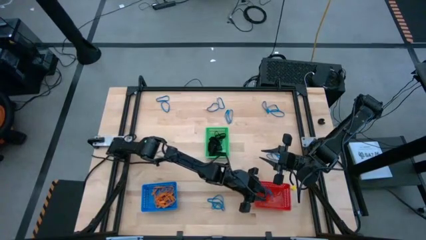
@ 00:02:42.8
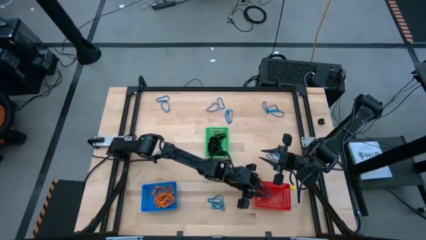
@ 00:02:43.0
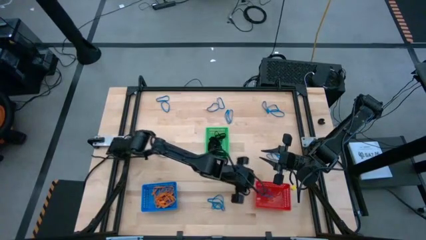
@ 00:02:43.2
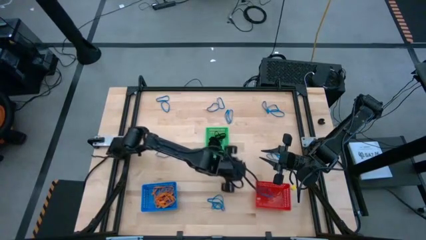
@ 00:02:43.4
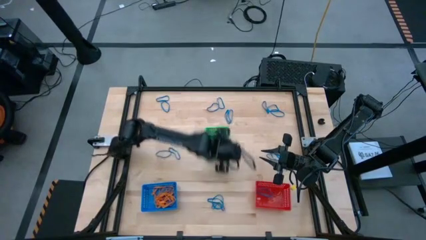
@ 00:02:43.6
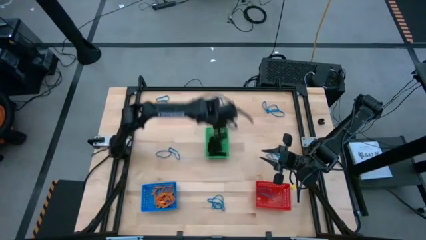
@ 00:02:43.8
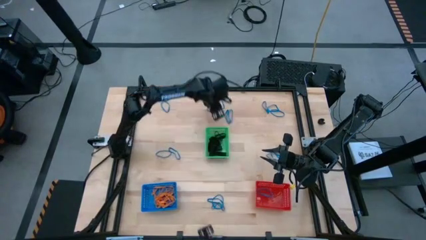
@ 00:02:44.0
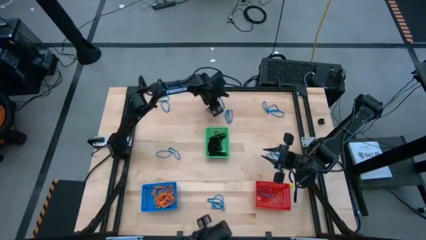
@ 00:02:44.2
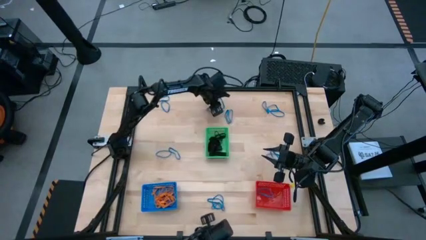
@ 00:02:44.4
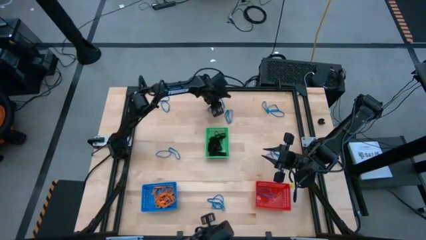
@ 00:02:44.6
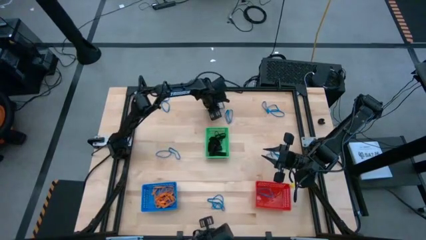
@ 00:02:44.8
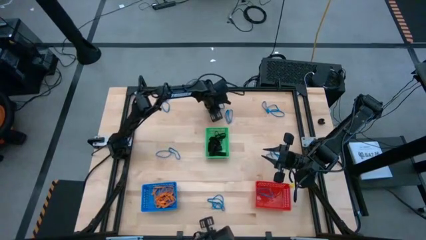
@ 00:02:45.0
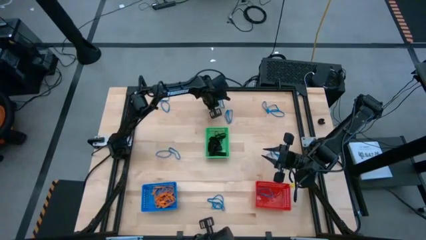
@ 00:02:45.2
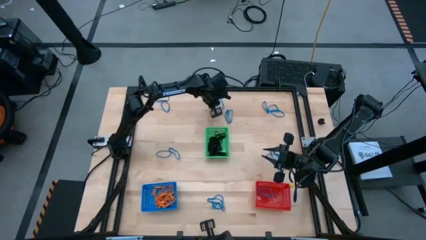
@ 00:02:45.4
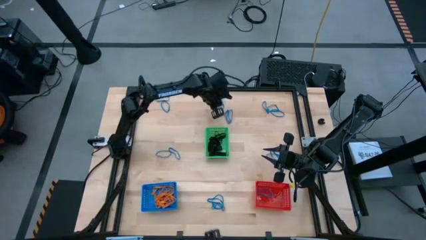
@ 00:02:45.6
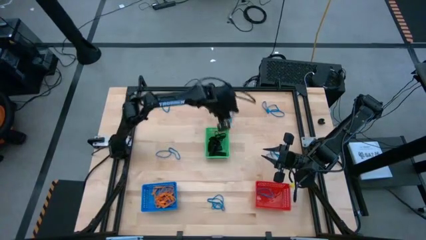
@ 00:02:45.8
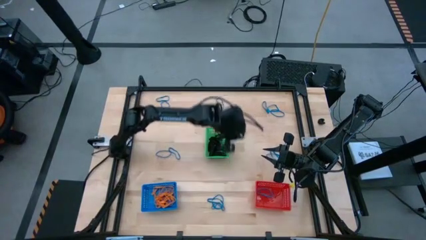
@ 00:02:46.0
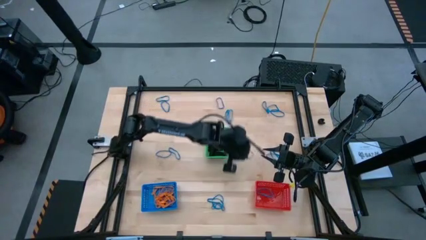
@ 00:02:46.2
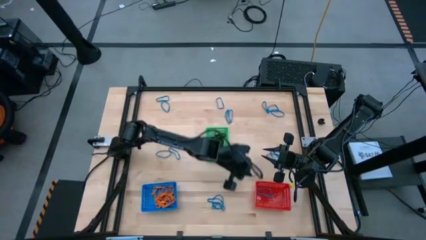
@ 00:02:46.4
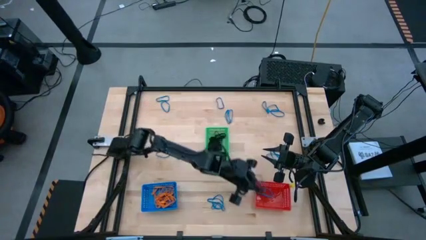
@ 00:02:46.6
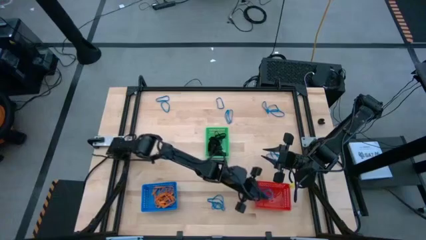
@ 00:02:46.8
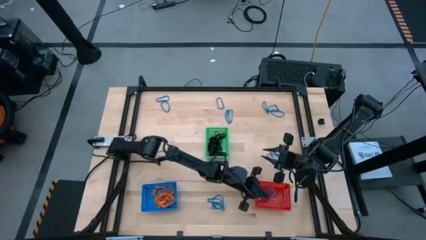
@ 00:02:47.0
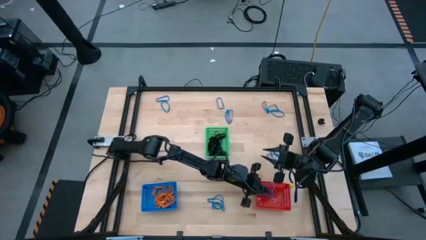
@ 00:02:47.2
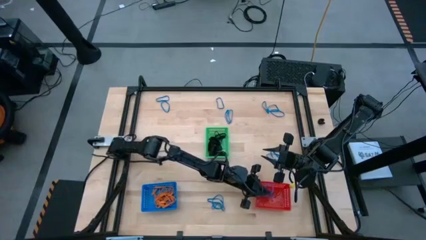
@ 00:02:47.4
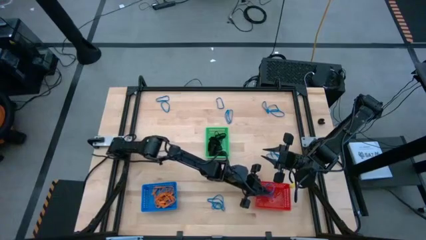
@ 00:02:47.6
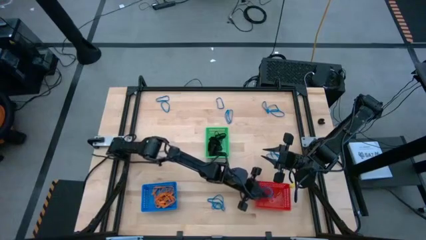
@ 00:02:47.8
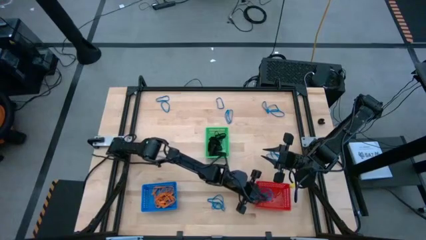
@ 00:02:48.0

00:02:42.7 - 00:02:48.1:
Task: Sort rubber bands into baskets
Put the blue rubber band into the red bin

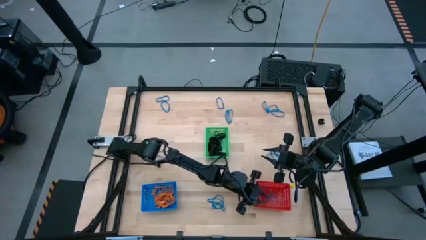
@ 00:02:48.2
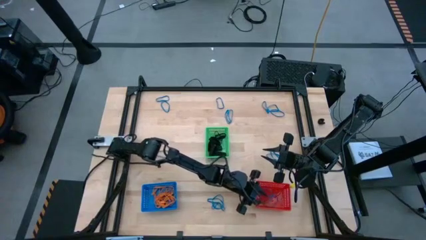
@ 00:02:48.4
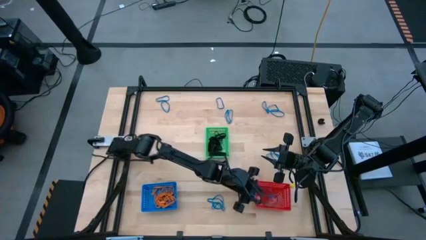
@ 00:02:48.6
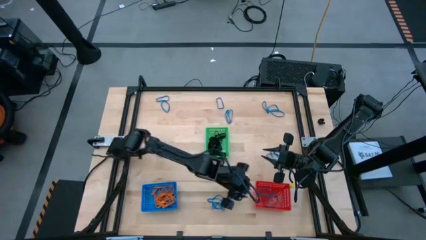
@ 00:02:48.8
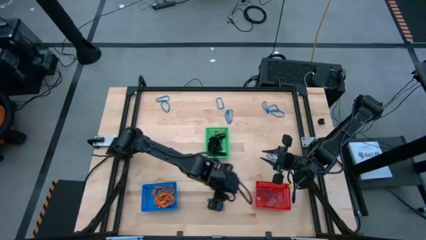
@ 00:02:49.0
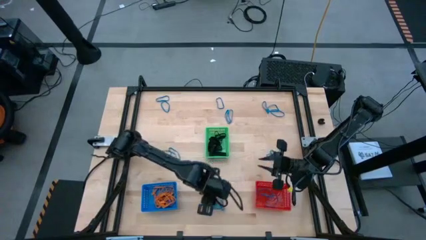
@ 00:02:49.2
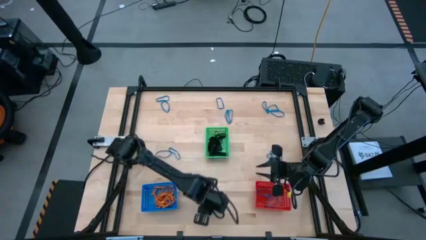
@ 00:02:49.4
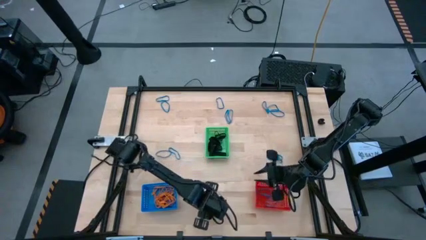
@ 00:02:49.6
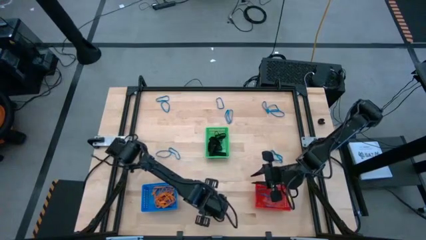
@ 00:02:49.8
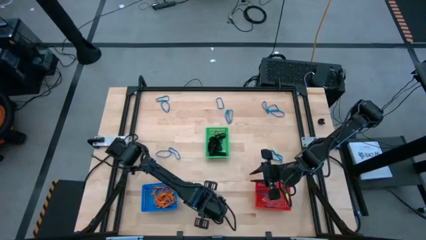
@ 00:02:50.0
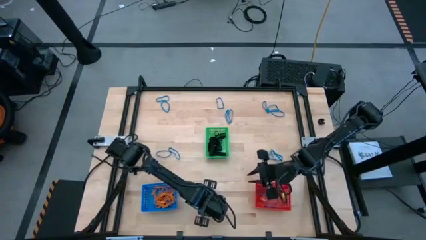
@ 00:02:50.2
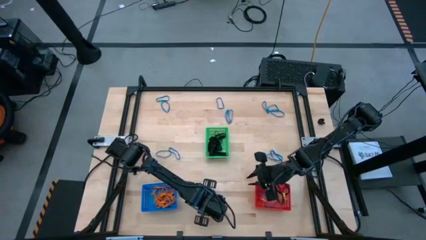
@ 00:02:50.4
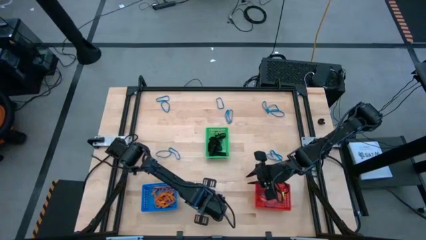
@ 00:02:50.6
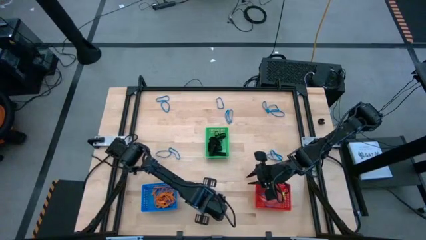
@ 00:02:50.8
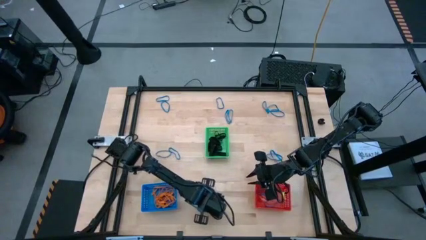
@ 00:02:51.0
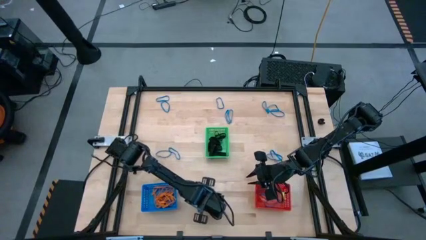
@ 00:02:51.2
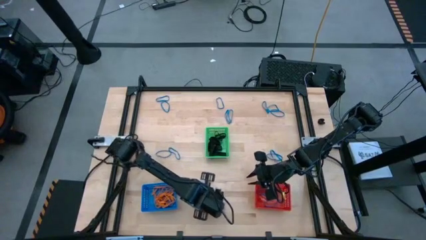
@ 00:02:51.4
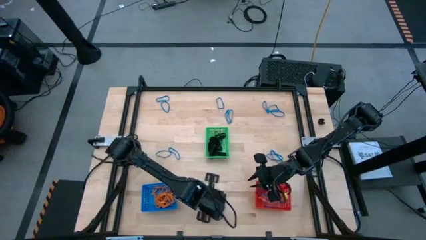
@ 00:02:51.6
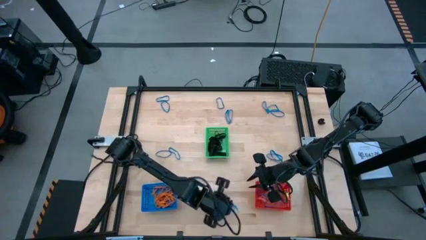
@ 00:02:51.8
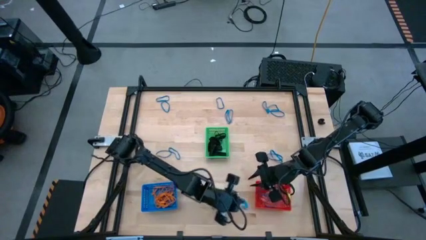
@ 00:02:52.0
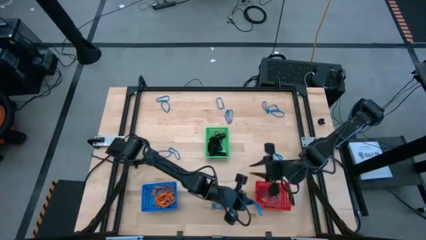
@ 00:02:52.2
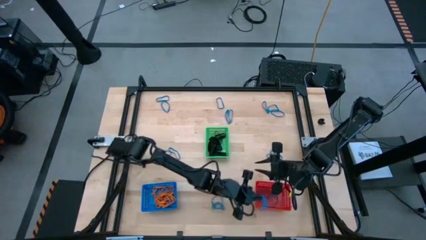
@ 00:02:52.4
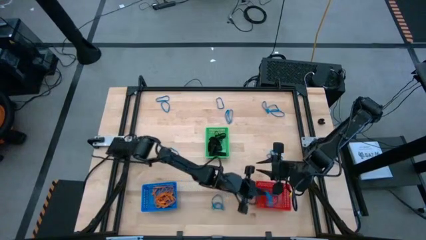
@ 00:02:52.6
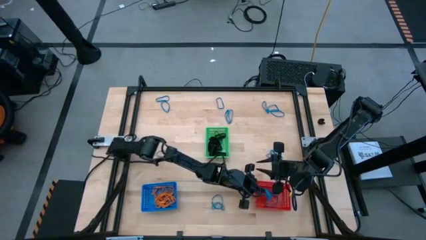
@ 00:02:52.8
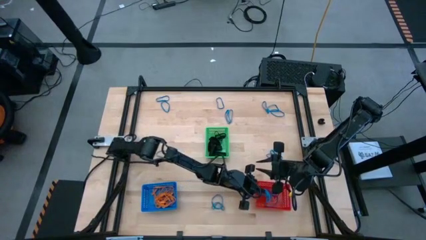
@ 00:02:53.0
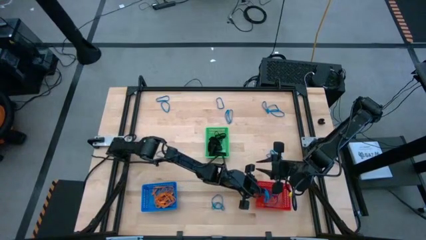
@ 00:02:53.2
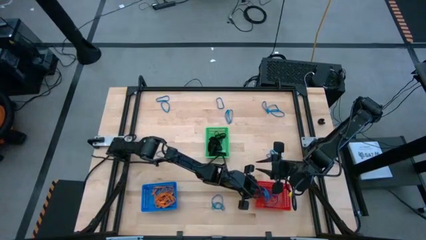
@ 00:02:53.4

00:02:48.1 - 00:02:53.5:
Put the blue rubber band into the red bin

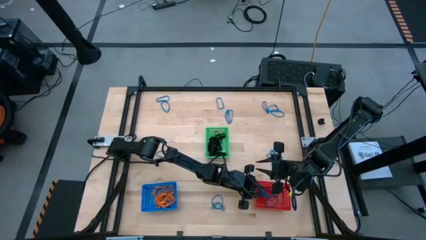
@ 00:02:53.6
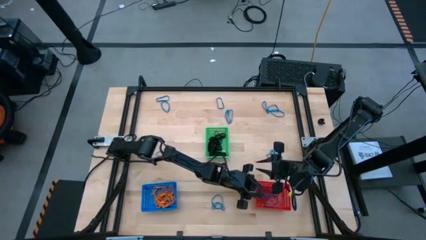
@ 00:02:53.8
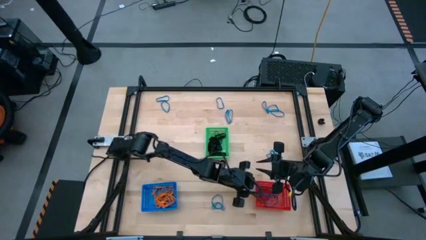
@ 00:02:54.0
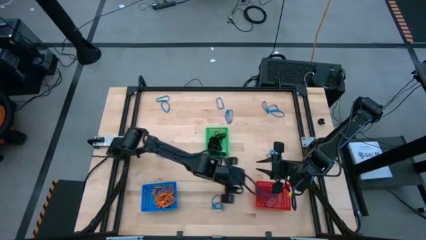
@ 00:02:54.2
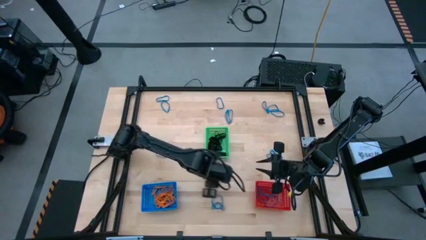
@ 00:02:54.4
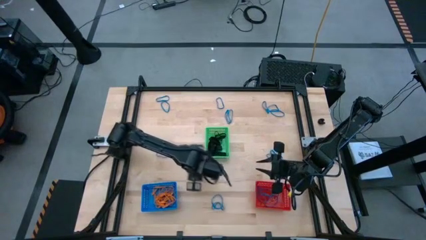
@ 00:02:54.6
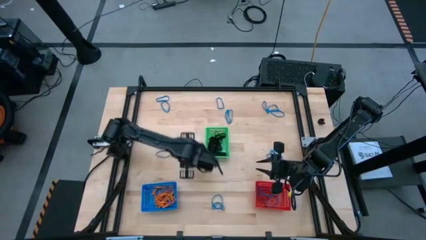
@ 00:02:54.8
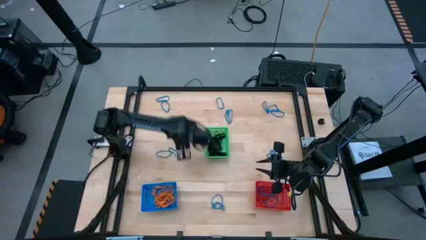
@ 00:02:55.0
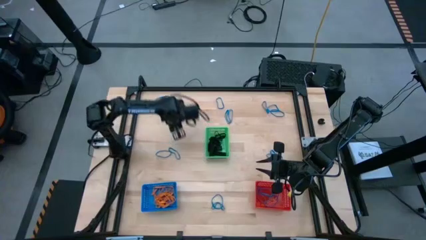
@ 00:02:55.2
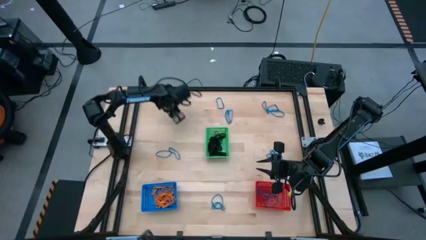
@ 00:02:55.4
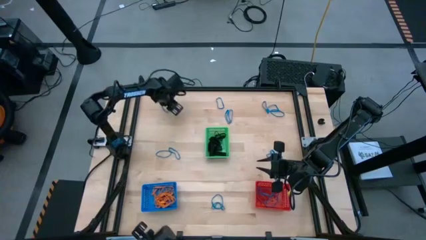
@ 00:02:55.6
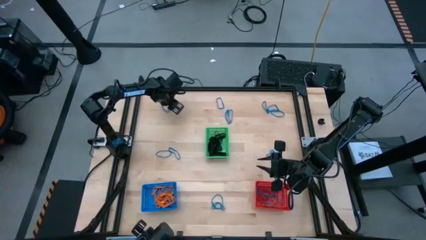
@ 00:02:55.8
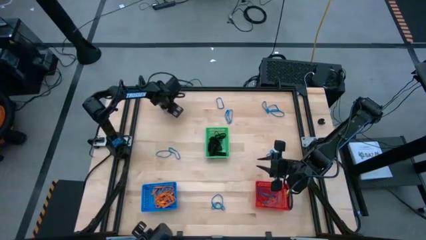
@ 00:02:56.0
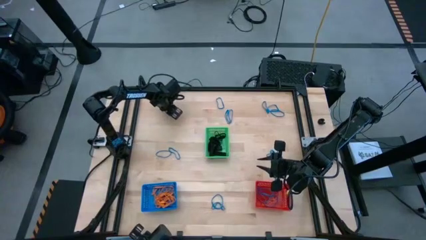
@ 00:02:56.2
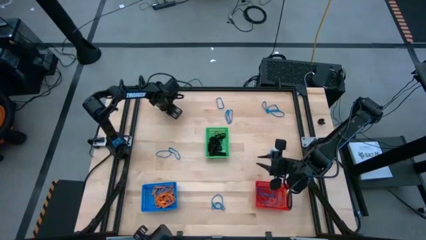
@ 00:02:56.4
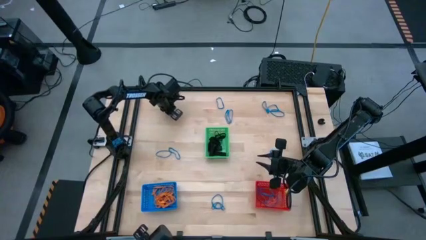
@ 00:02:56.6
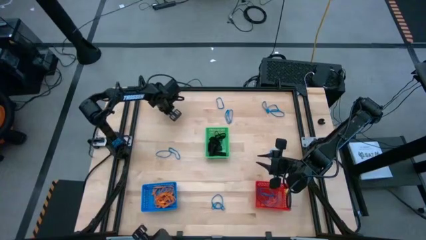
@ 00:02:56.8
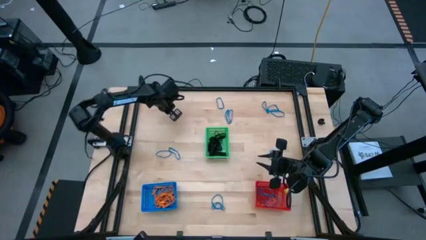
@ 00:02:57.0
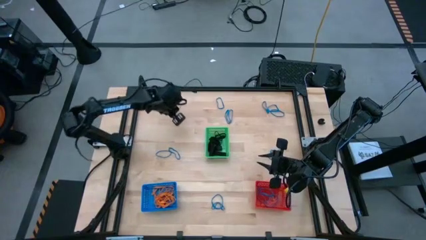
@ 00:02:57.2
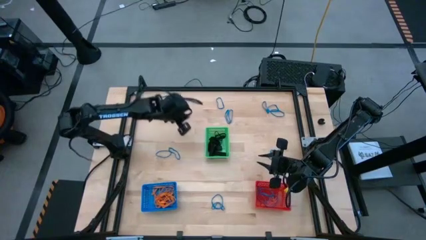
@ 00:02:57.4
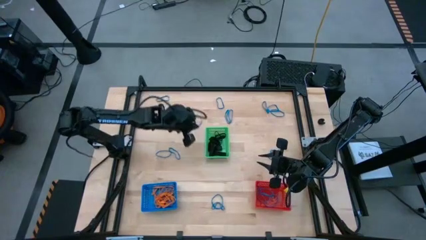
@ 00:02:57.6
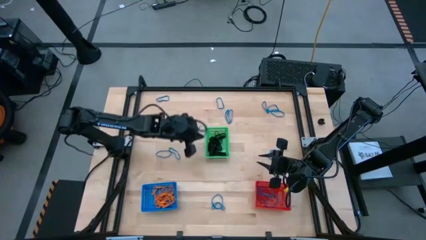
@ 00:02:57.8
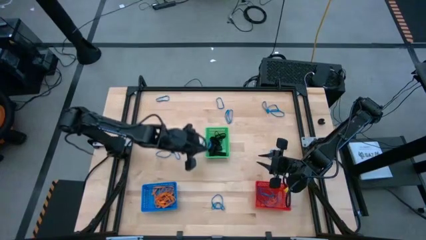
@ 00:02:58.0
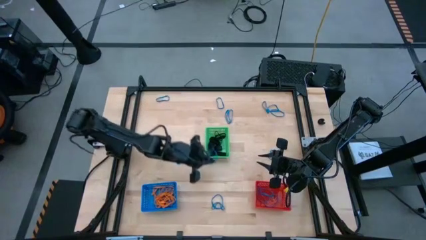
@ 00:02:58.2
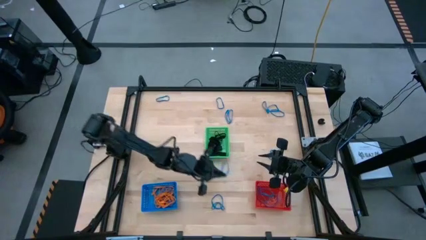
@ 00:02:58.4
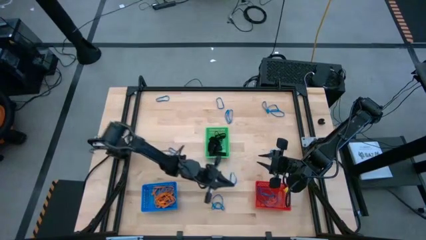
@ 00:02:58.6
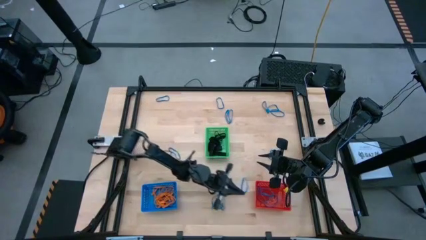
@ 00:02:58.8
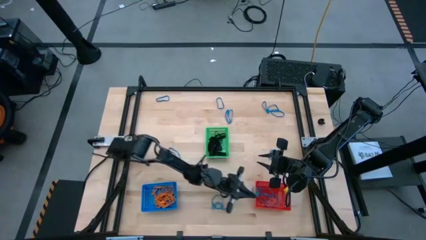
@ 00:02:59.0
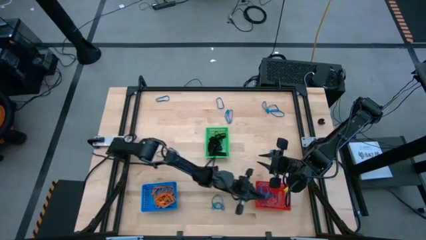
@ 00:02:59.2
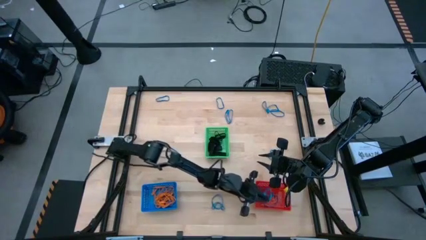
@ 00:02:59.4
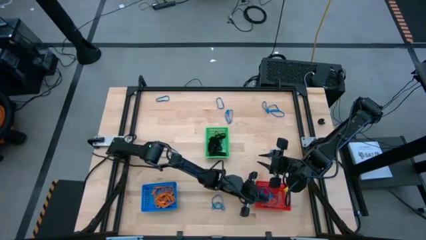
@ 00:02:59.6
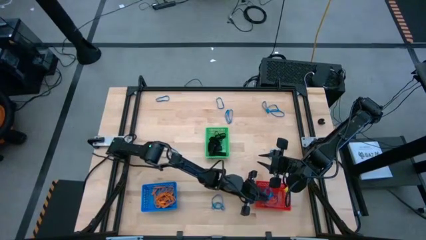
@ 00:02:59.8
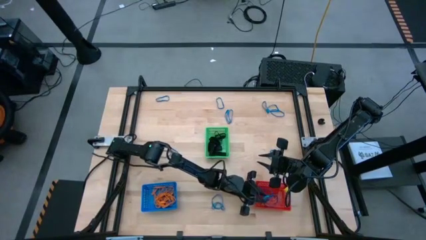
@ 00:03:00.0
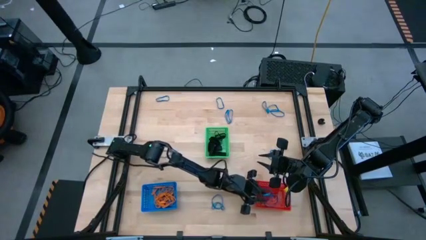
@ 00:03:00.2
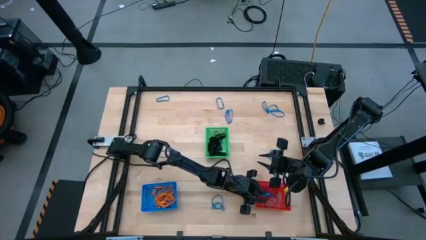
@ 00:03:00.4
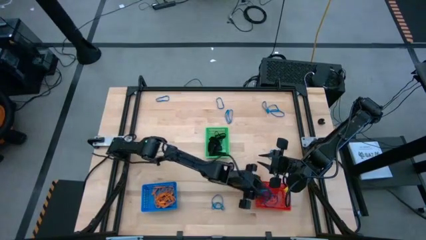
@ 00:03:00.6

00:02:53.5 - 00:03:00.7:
Put the blue rubber band into the red bin
